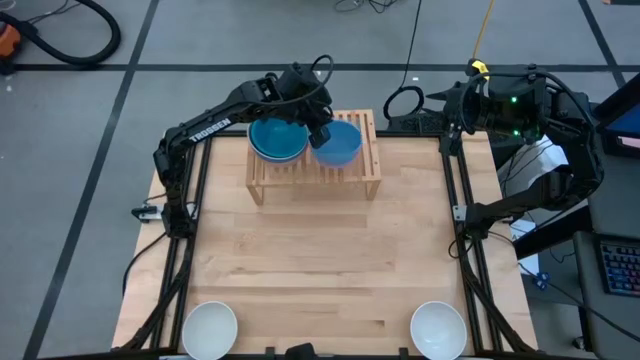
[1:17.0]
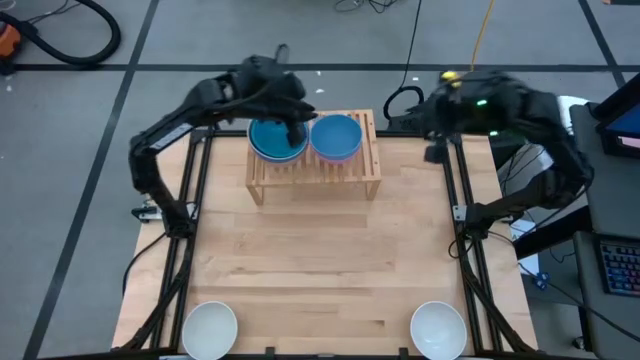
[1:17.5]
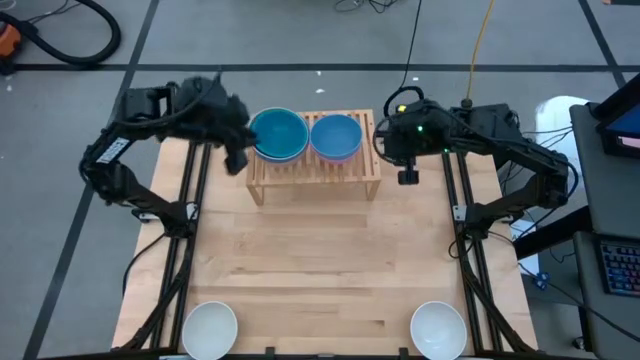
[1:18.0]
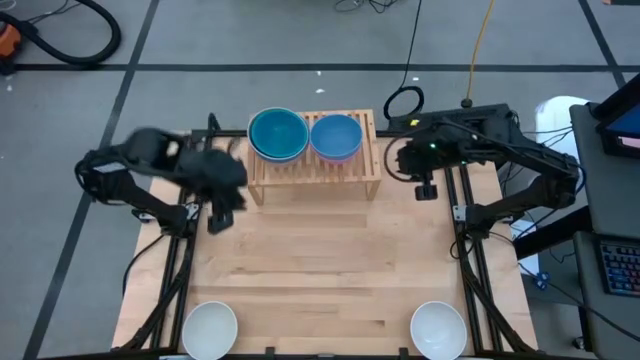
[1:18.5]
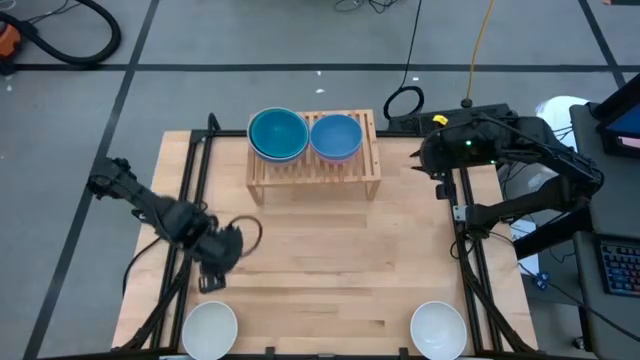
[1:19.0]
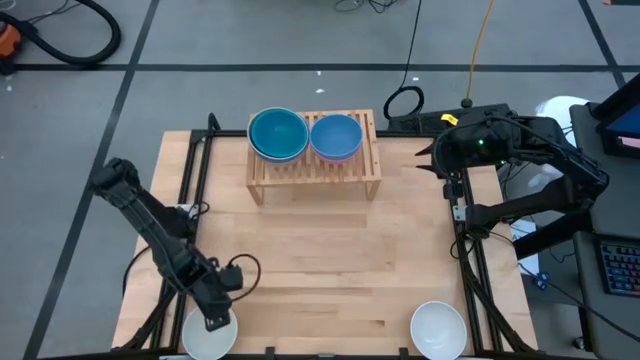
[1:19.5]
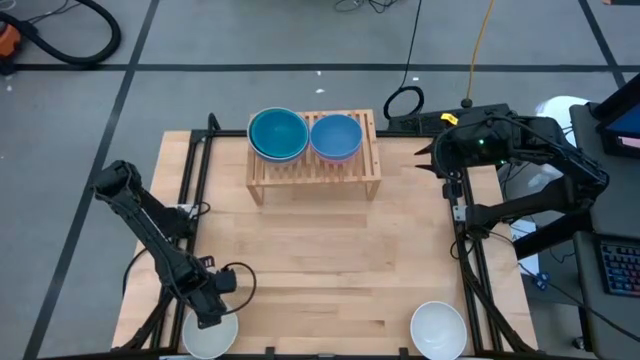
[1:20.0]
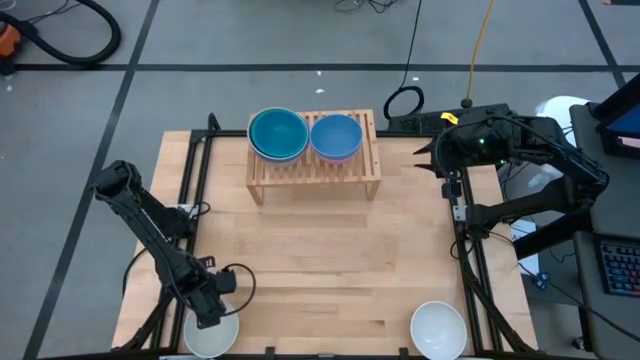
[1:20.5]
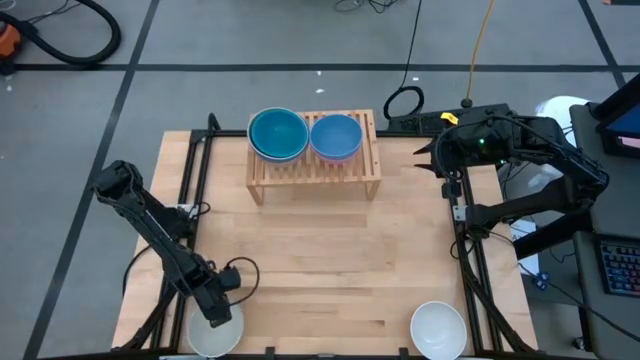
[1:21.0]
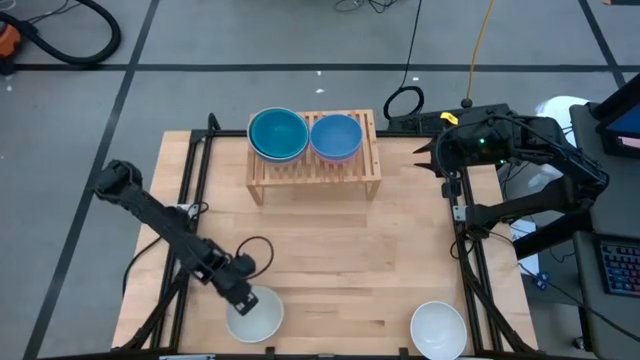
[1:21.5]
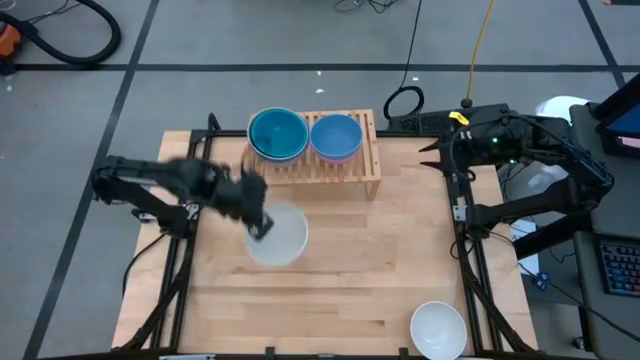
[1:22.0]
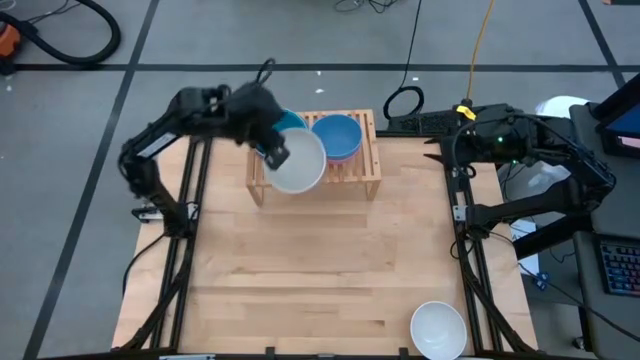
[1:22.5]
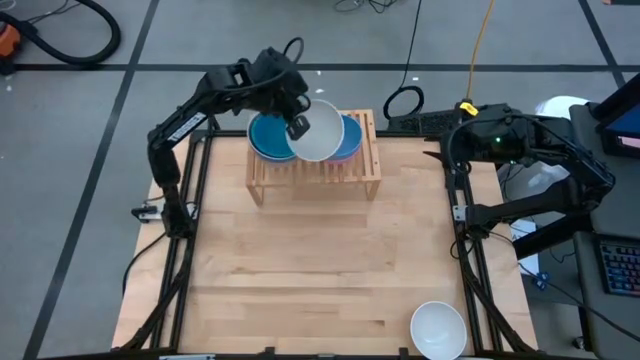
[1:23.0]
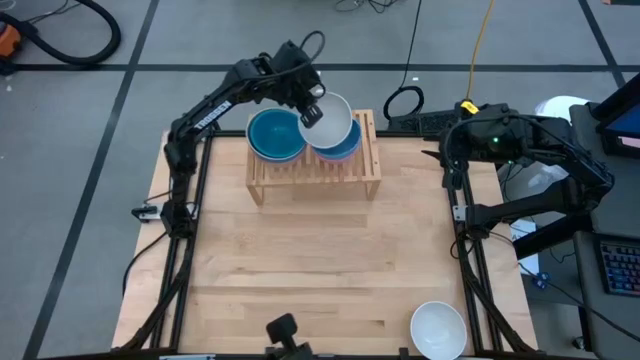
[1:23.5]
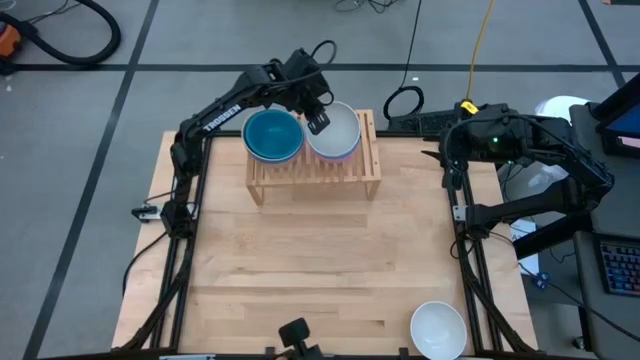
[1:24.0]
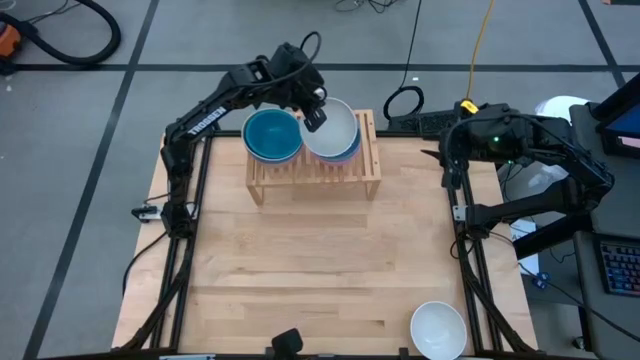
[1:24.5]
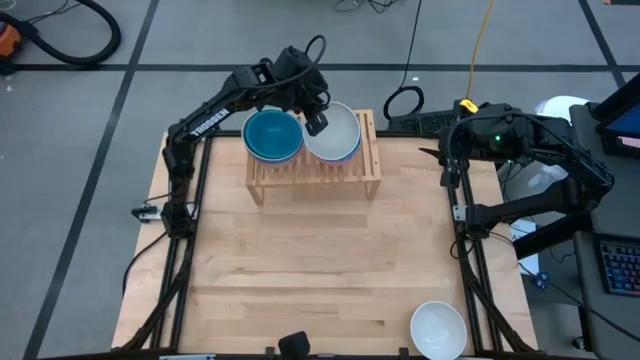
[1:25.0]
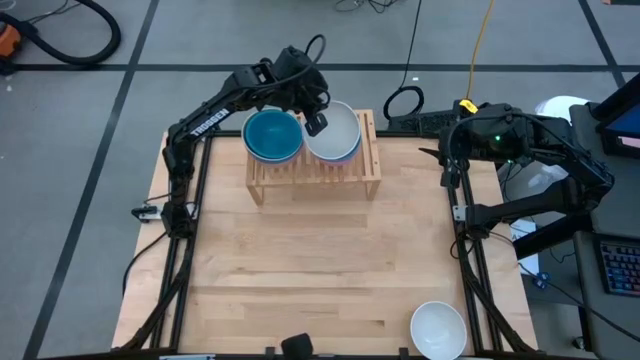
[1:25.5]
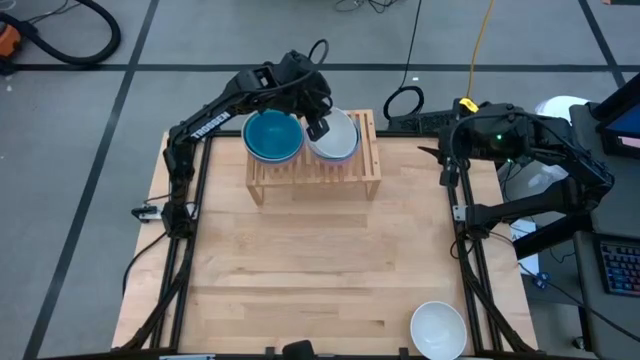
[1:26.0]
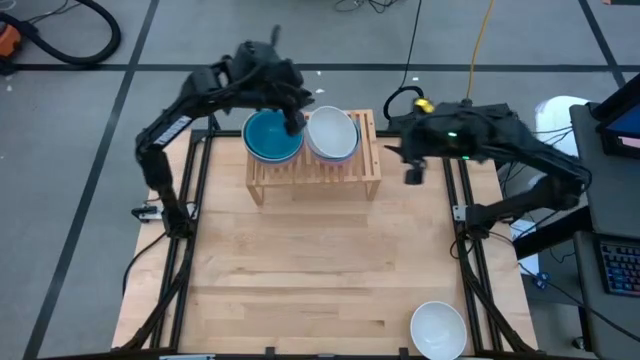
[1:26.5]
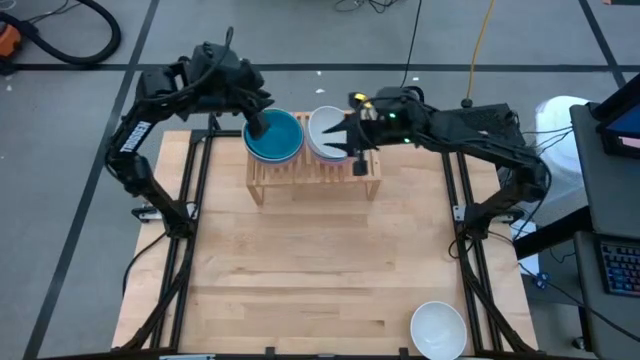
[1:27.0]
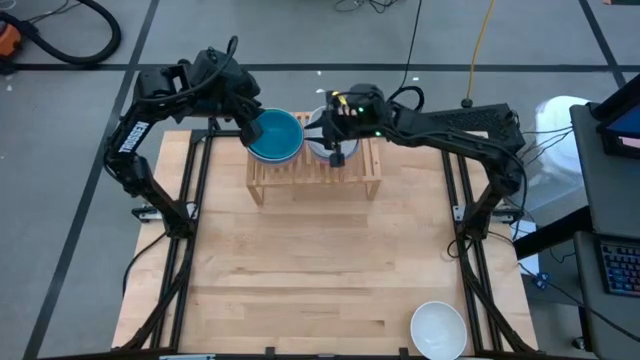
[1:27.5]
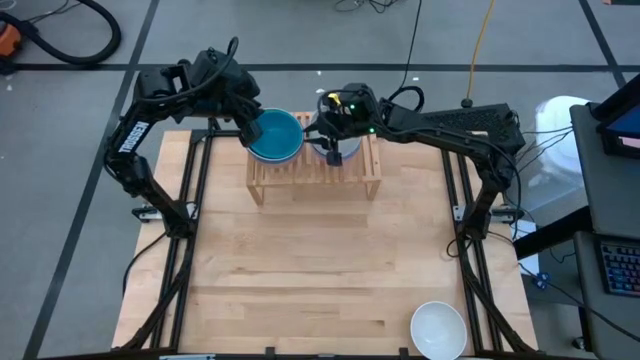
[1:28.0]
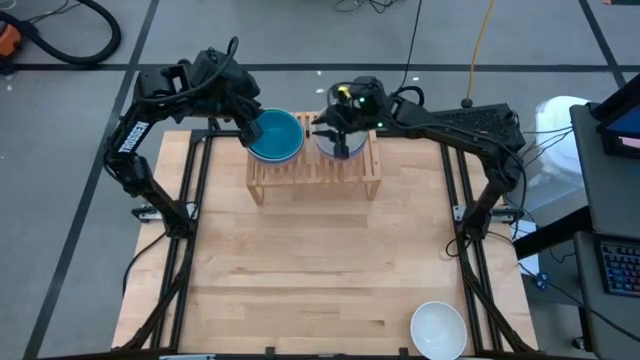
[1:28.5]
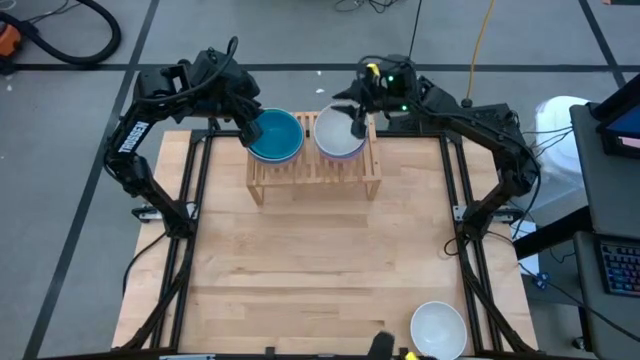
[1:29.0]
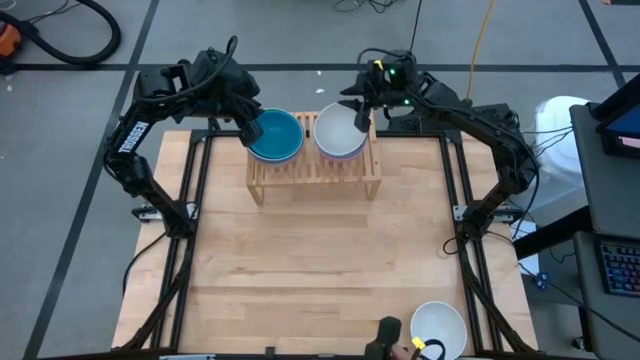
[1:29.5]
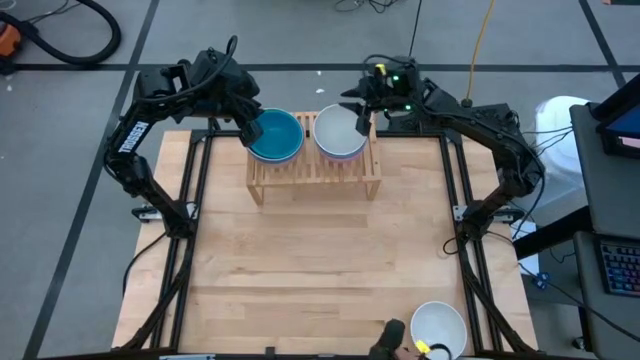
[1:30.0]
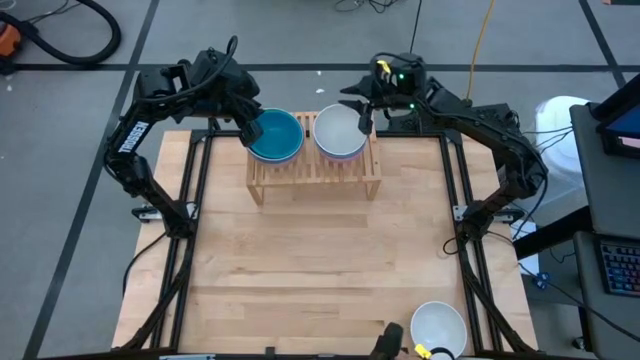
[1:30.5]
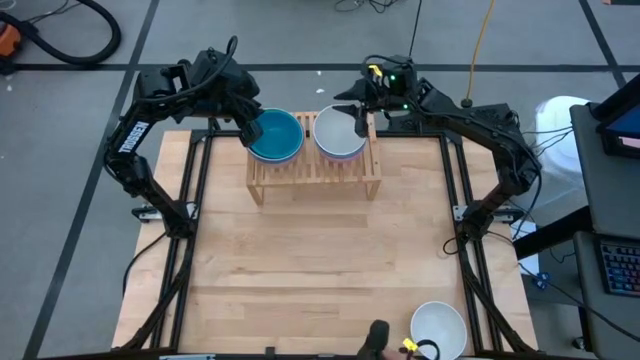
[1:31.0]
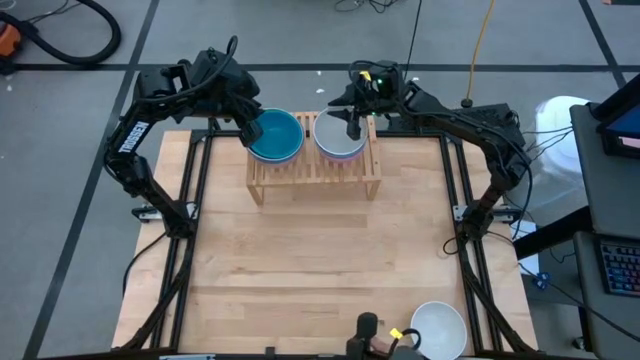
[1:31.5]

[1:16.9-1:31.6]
Task: Place and stack bowls onto a shelf
Stack the left white bowl on top of the blue bowl on the shelf

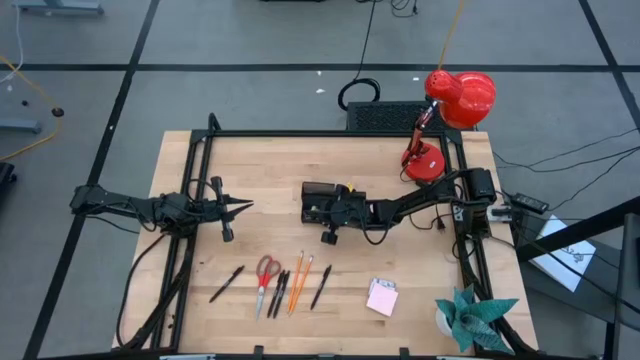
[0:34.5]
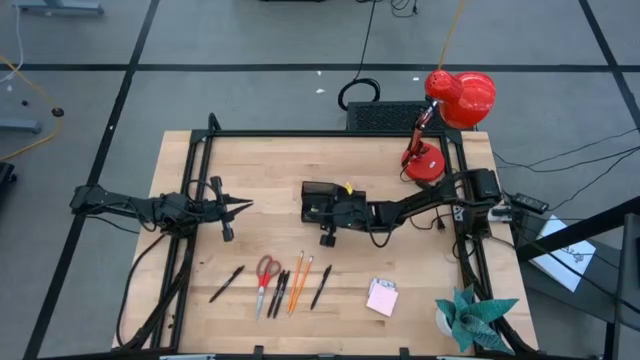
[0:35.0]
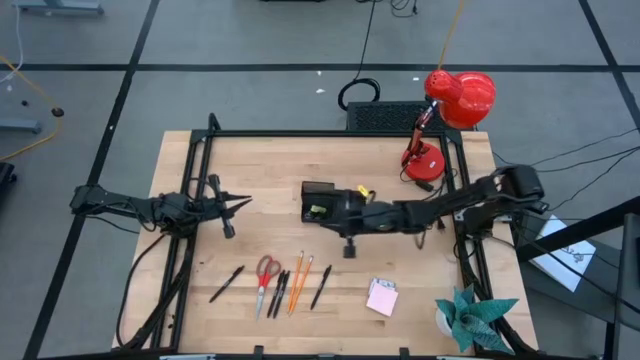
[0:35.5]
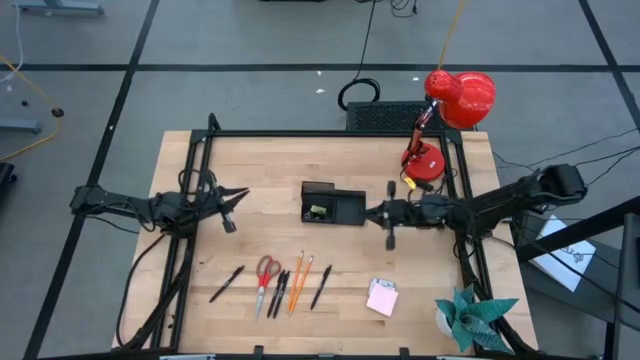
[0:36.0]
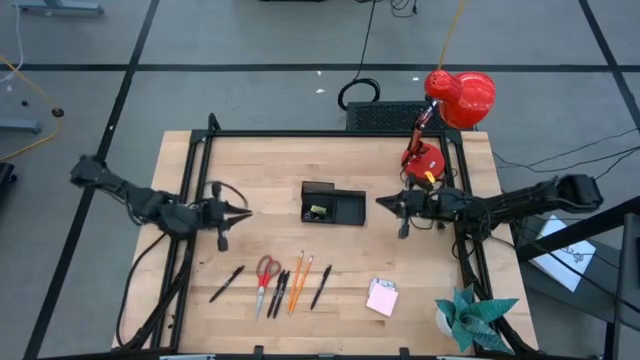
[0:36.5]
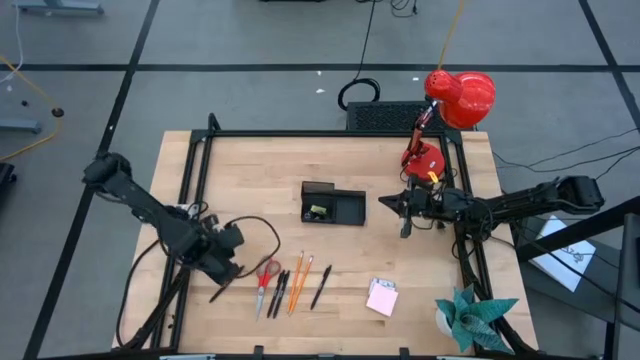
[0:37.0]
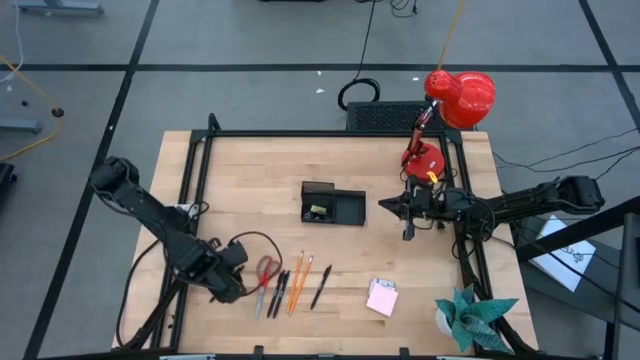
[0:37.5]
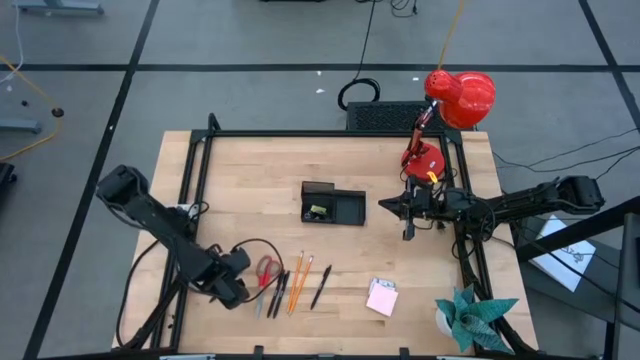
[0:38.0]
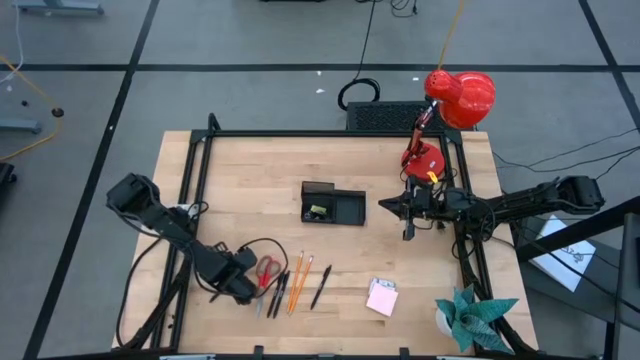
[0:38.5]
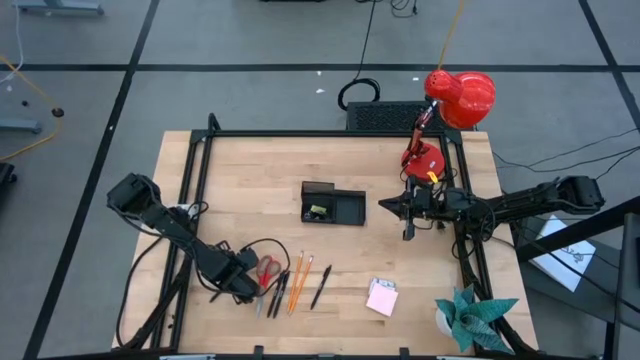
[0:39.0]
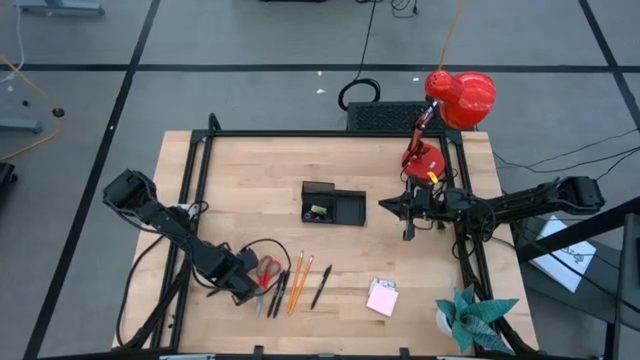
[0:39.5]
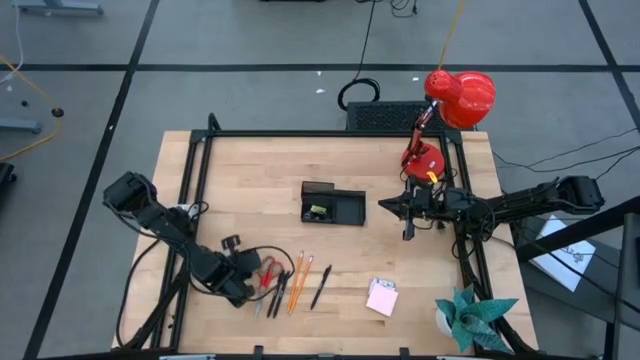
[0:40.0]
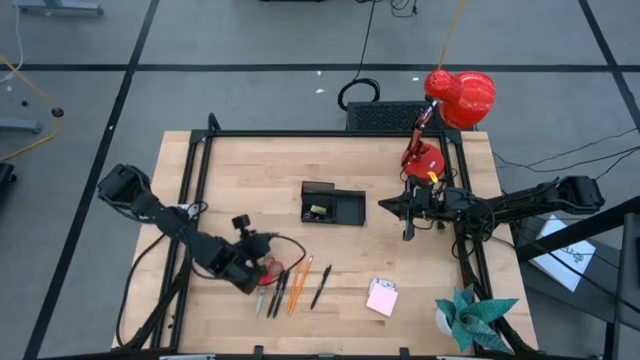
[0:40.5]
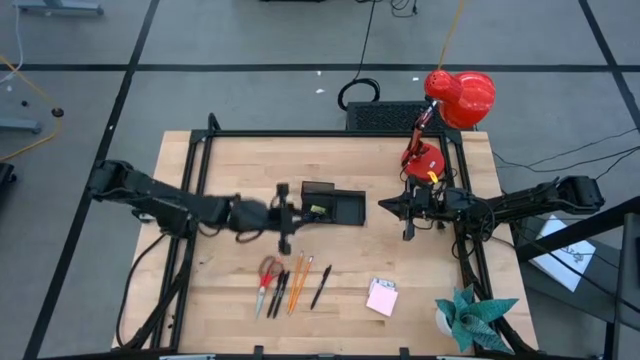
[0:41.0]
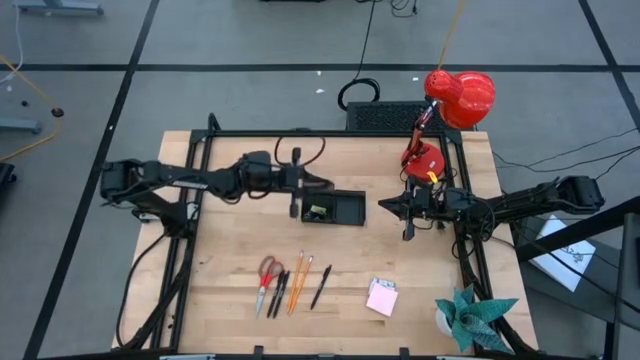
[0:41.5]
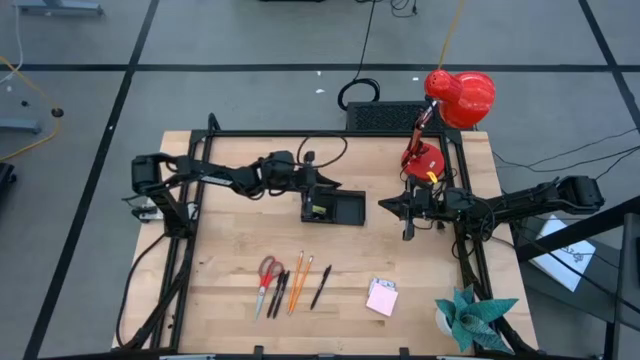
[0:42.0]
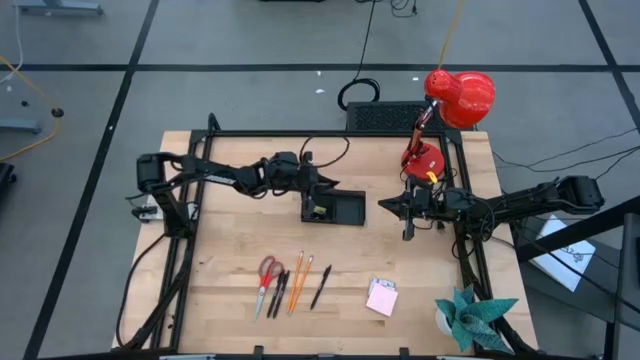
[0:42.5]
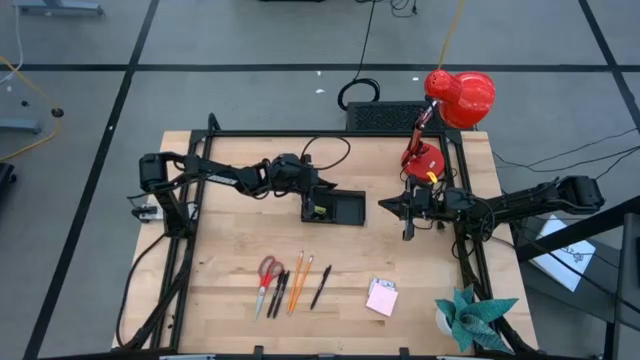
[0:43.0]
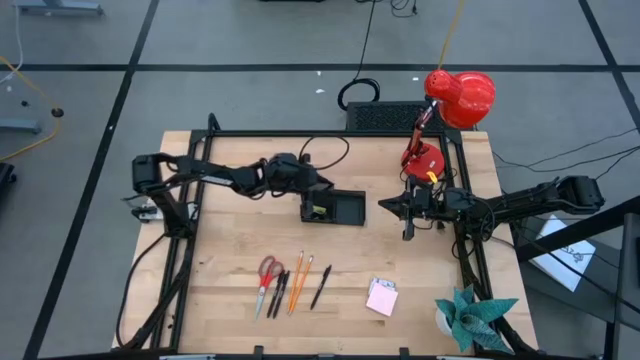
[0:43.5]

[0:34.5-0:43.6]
Task: Pick and place office supplies into organizer
Put the black pen into the desk organizer
